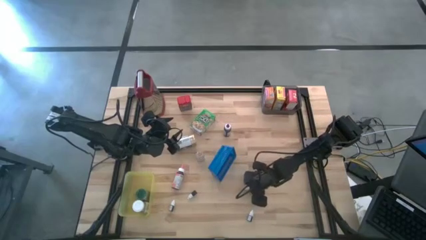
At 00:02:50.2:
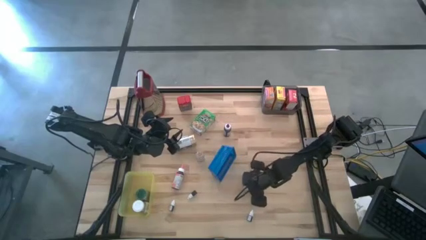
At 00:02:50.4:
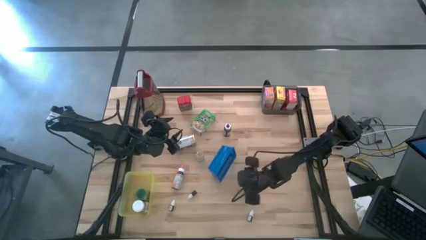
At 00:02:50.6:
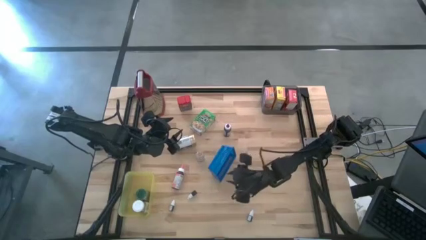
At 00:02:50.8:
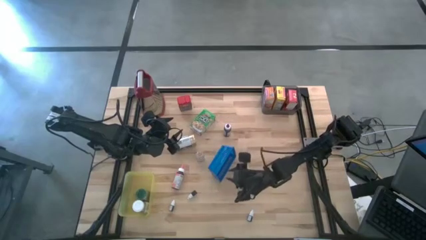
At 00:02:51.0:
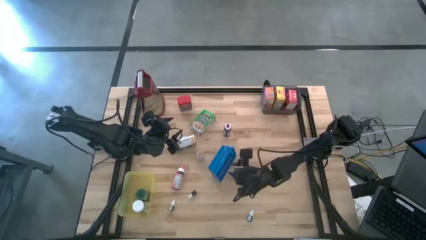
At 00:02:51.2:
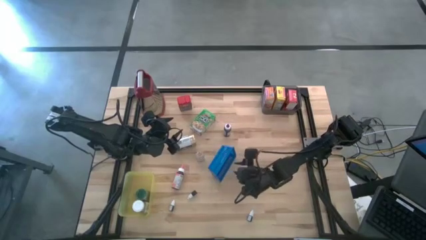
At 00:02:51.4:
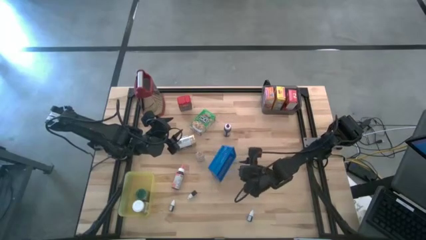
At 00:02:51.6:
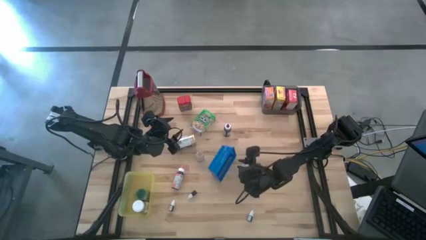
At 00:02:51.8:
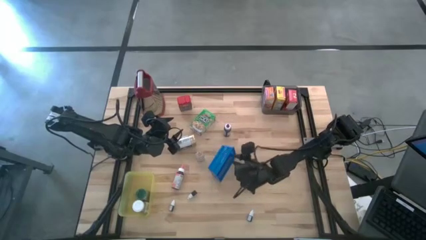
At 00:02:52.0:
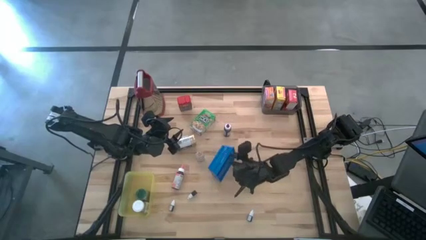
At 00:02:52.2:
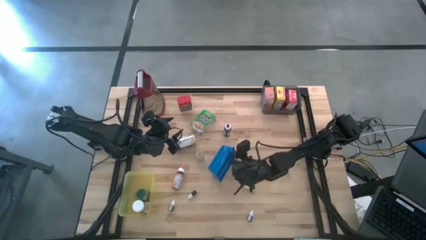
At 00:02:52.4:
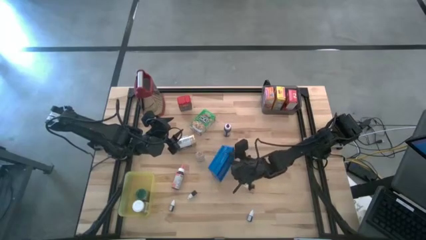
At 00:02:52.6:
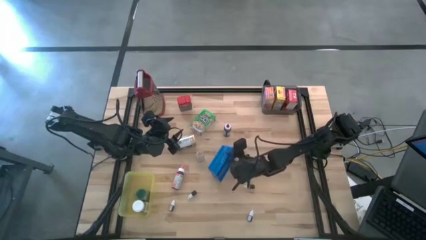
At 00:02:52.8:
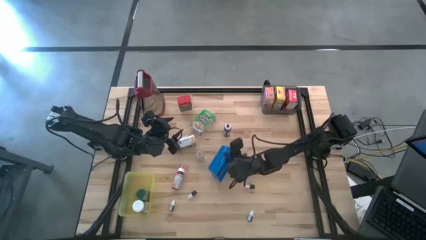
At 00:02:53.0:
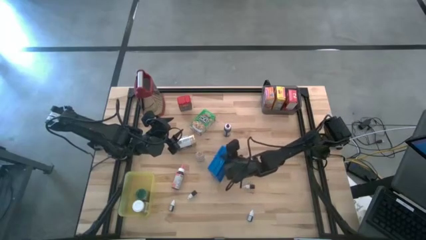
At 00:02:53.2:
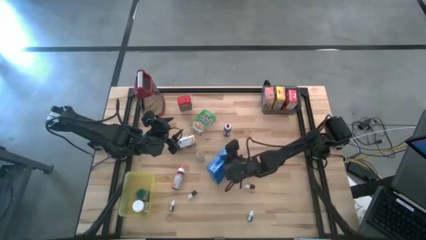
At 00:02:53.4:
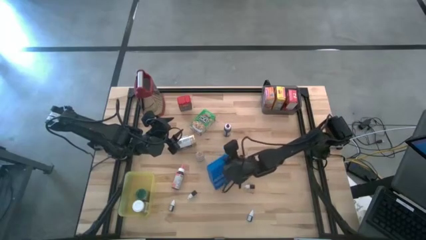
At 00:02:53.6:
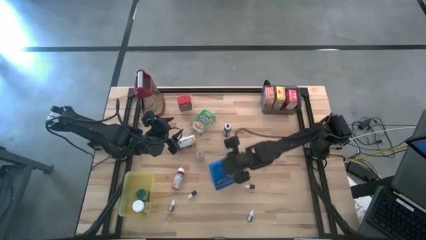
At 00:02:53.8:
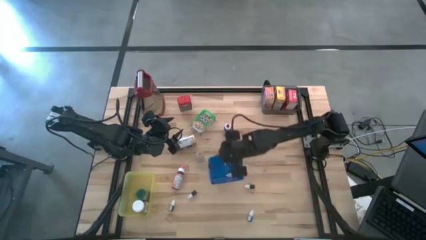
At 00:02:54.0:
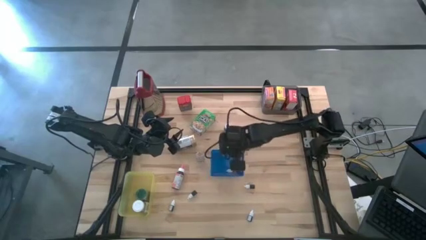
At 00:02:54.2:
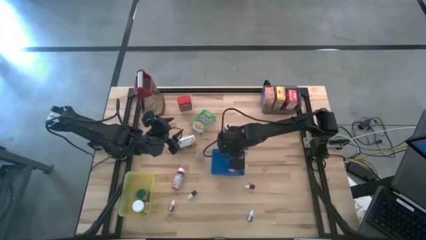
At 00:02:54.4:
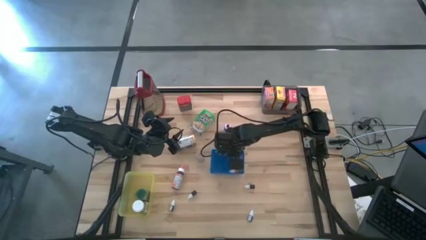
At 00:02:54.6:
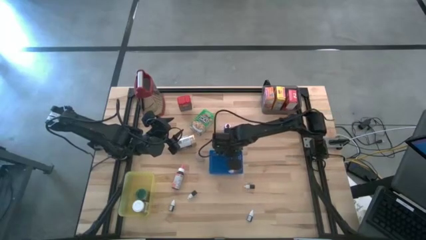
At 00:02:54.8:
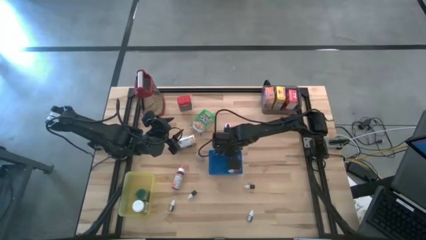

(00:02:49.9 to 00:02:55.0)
Task: Pick & Place Kitchen Items
Adjust the blue bin on the table

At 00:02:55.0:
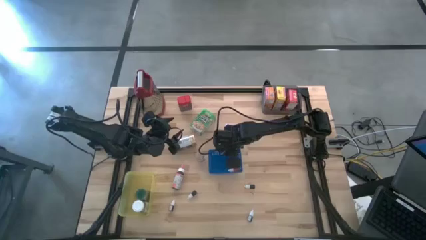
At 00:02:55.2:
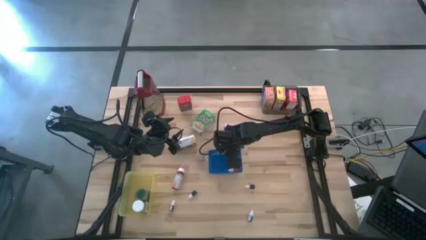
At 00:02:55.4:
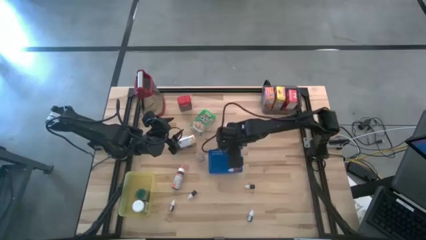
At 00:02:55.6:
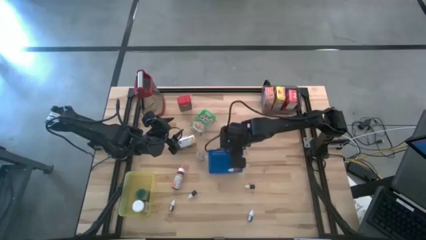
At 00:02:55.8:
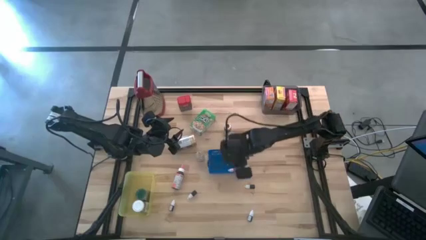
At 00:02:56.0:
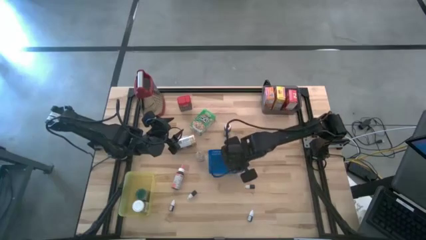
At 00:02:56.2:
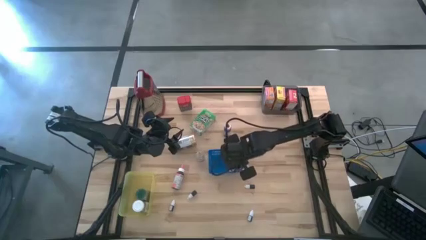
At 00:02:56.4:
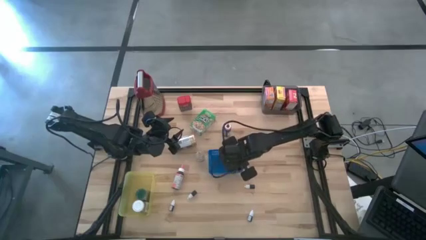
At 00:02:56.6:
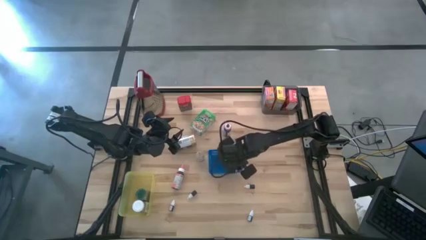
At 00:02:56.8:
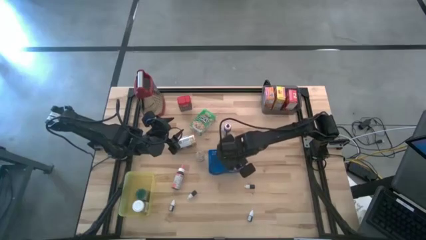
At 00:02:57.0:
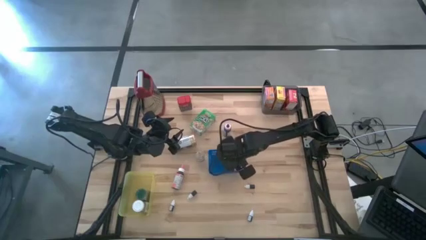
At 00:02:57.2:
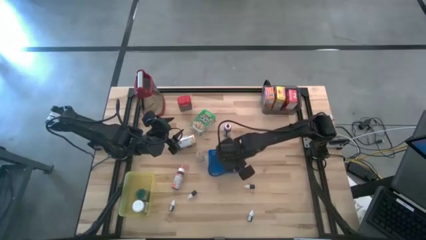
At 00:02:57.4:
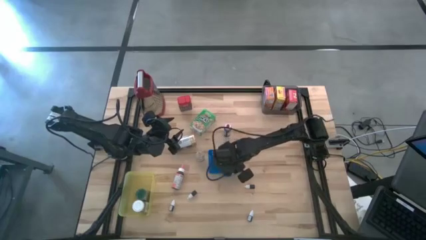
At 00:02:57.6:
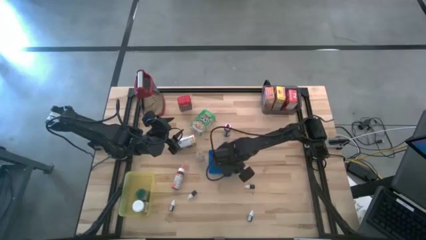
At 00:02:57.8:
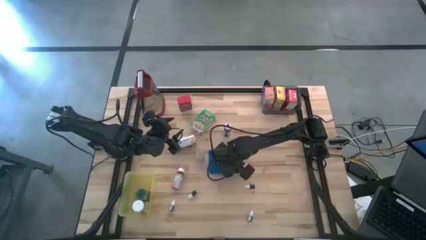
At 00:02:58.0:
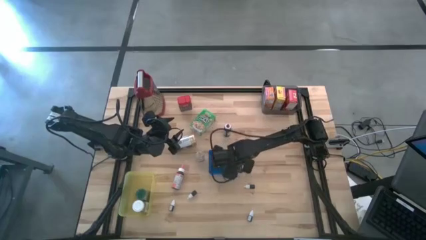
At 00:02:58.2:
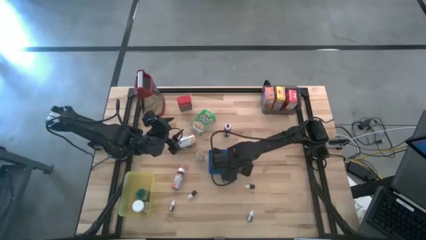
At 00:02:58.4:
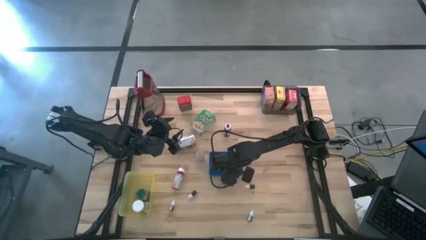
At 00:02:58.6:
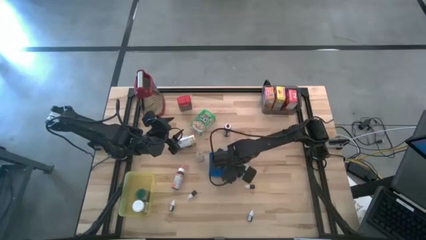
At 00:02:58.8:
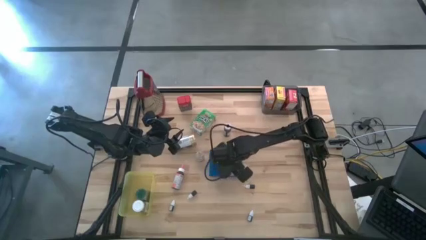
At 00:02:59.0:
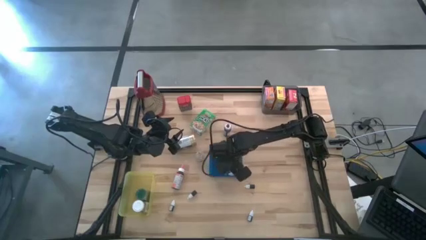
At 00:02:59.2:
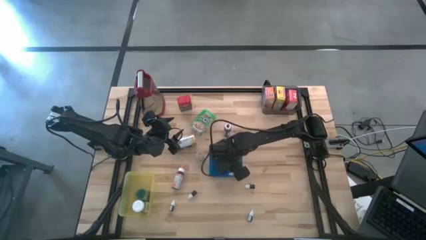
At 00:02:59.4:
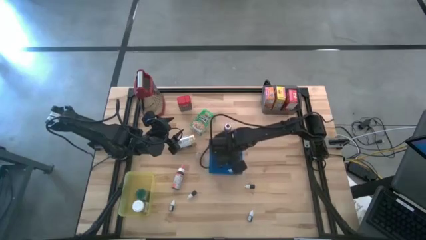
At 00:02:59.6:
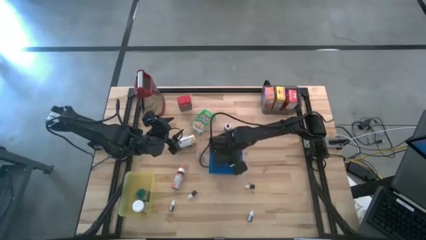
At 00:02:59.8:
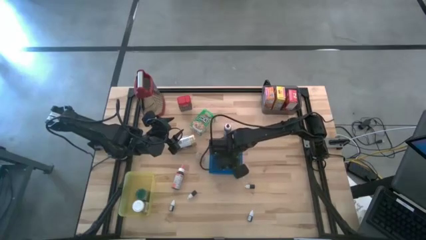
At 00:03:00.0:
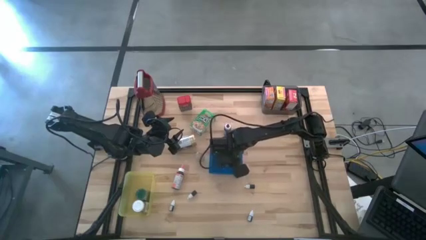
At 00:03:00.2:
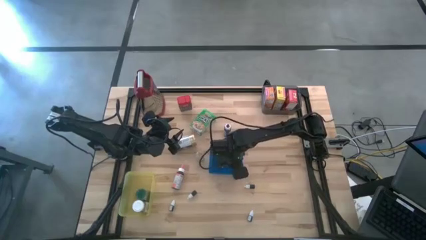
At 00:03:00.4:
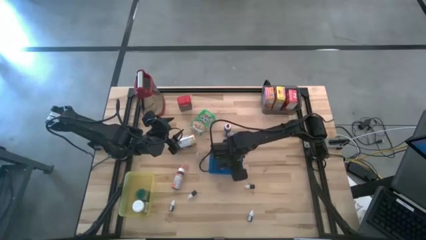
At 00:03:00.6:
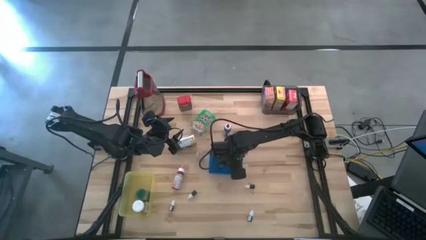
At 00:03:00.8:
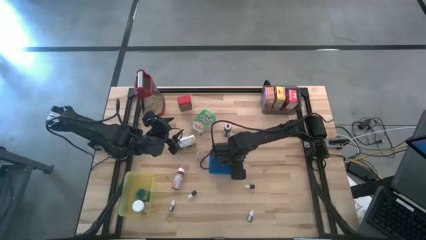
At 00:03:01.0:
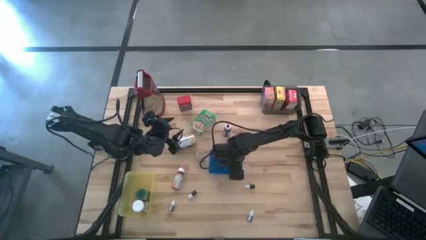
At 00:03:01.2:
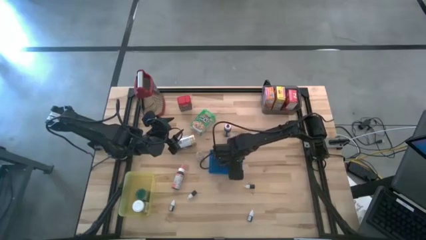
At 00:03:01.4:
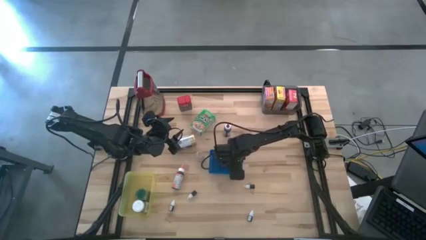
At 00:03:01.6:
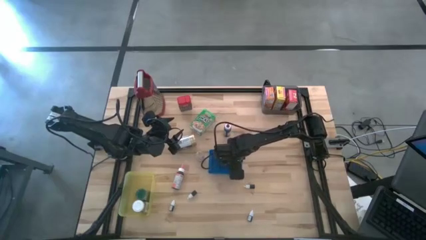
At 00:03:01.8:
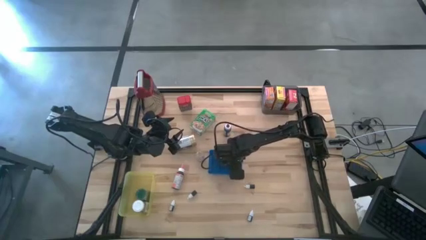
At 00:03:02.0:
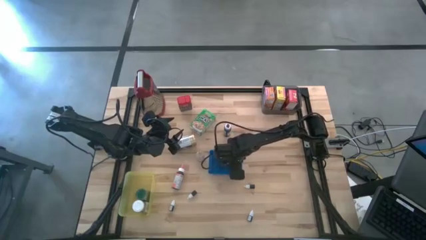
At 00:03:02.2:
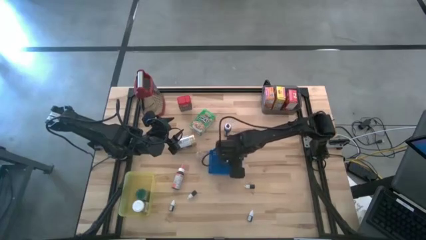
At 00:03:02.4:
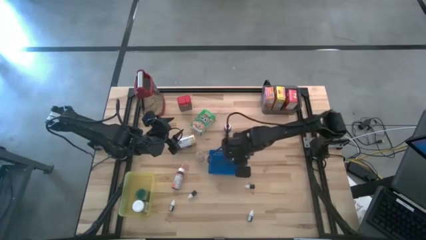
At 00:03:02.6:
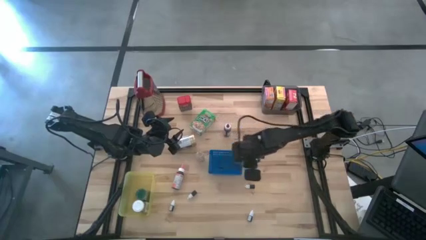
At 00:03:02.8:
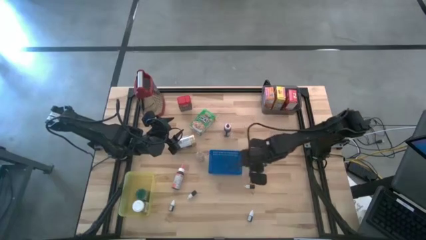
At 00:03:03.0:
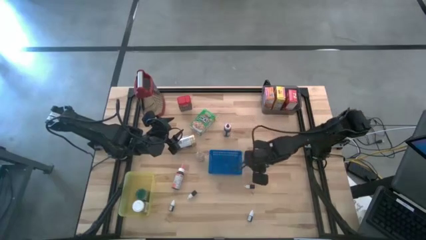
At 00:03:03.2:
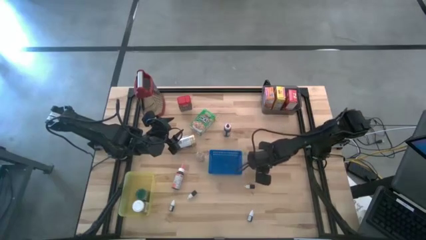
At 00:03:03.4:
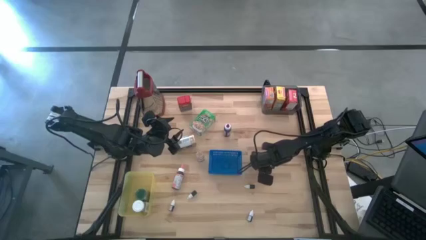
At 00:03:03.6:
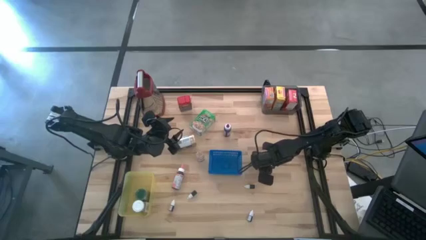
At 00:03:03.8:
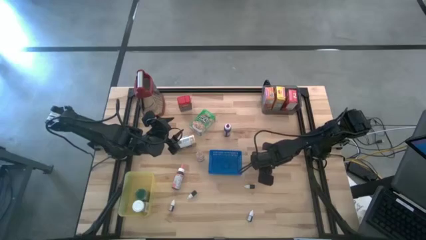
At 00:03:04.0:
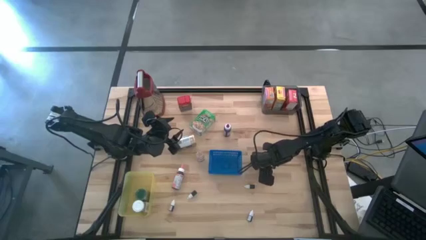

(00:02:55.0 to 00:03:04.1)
Remove the small yellow food coloring bottle from the blue bin
